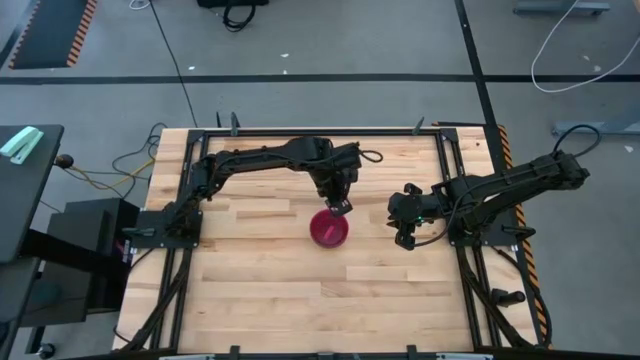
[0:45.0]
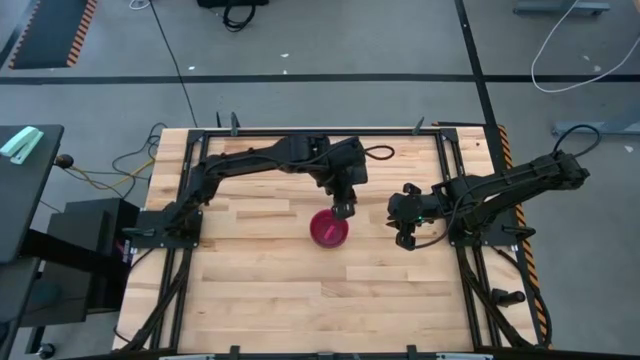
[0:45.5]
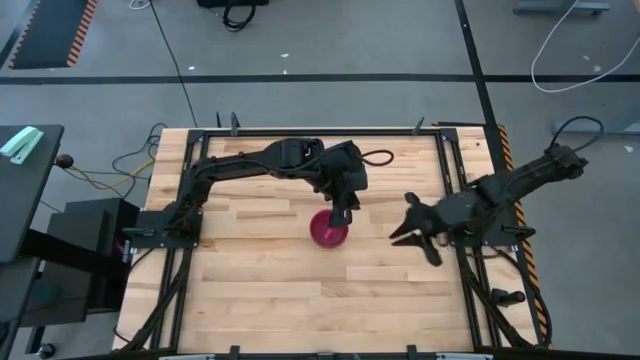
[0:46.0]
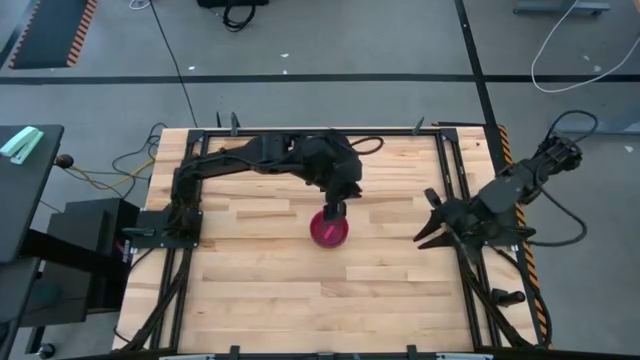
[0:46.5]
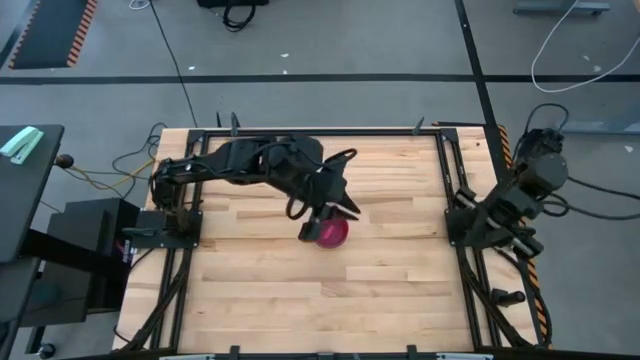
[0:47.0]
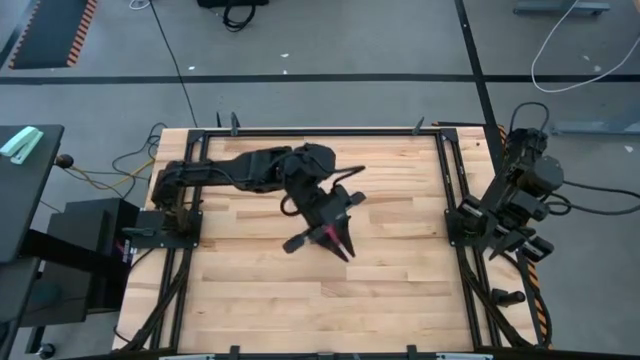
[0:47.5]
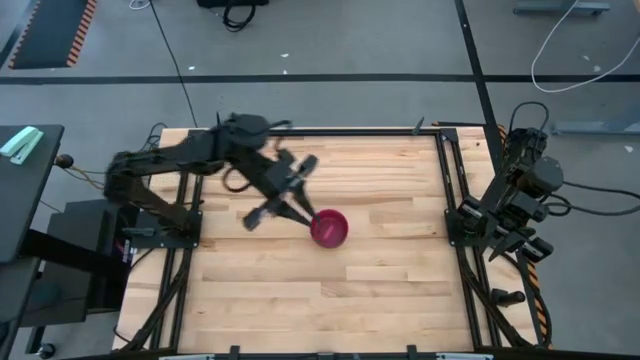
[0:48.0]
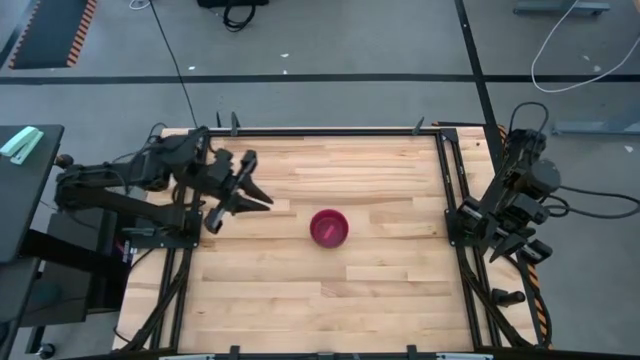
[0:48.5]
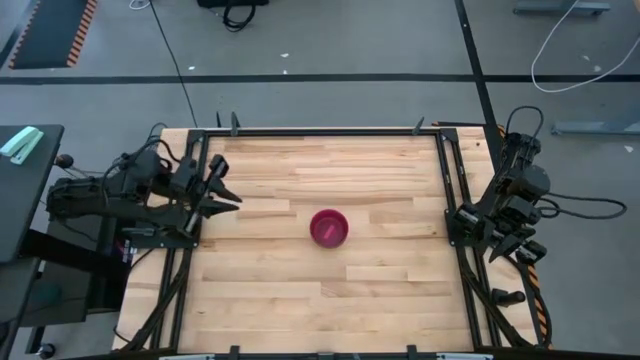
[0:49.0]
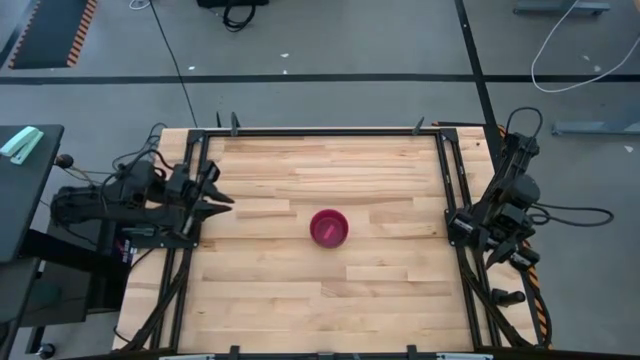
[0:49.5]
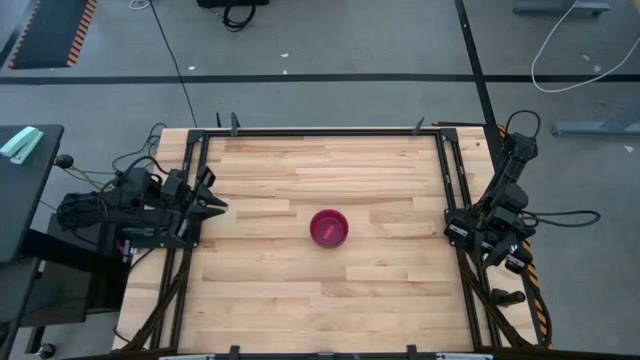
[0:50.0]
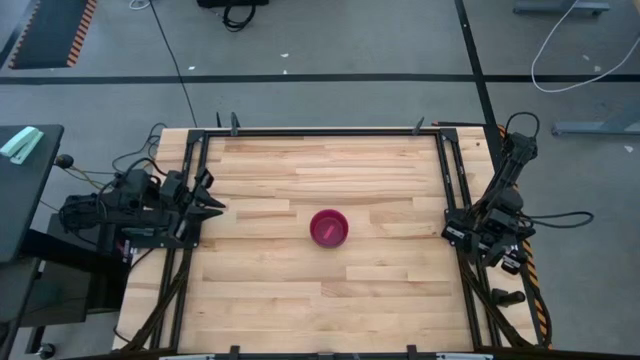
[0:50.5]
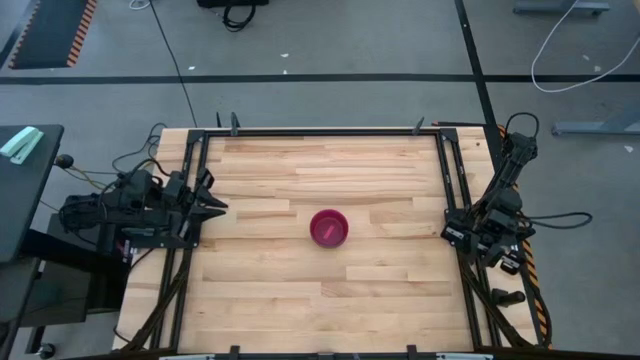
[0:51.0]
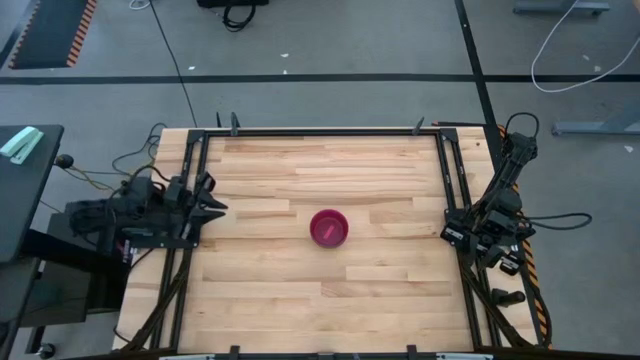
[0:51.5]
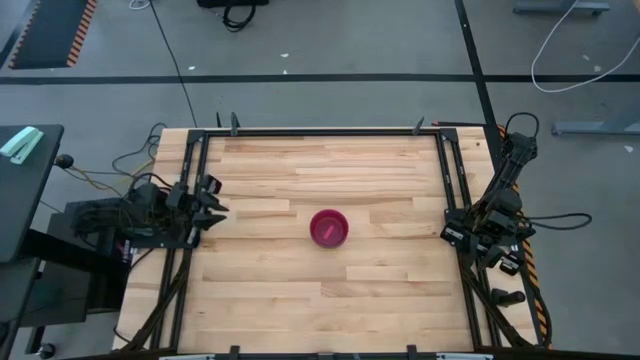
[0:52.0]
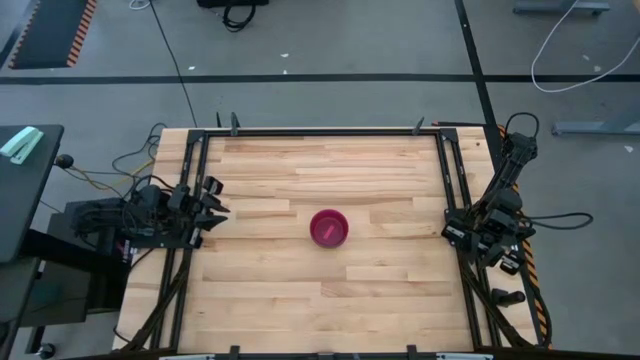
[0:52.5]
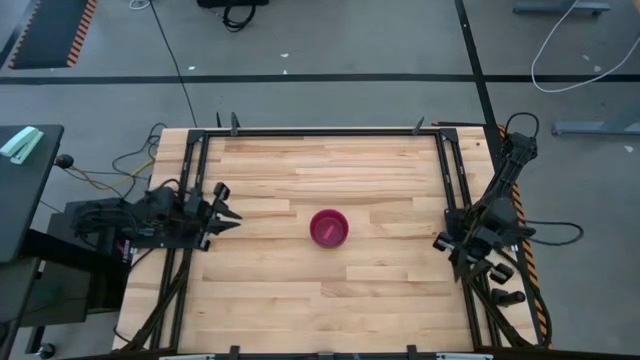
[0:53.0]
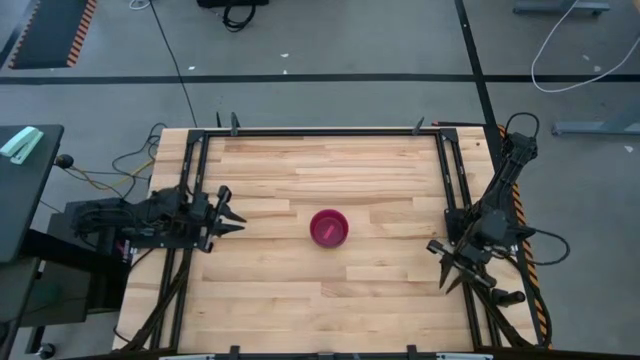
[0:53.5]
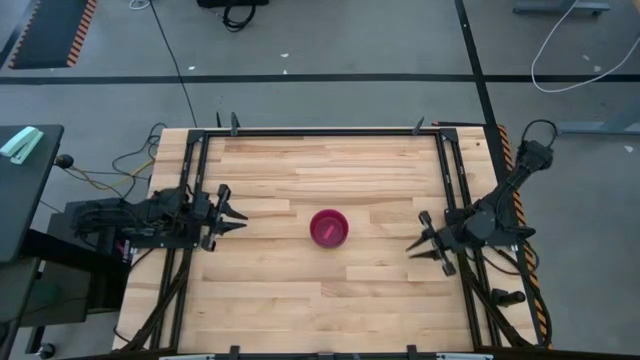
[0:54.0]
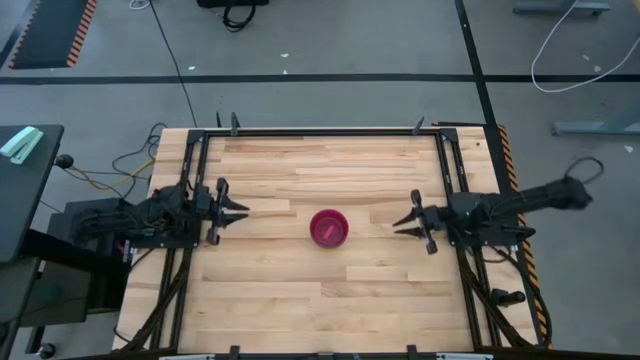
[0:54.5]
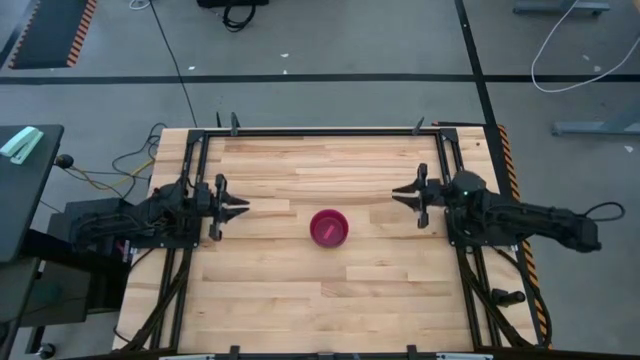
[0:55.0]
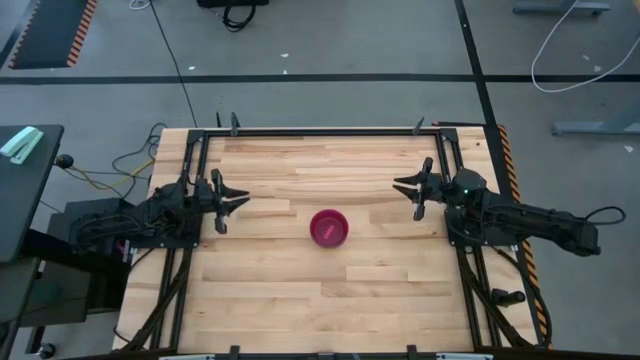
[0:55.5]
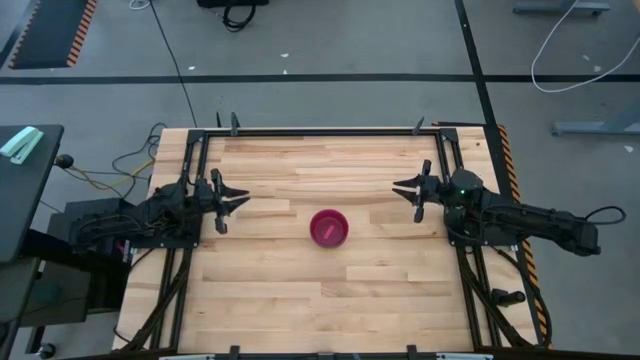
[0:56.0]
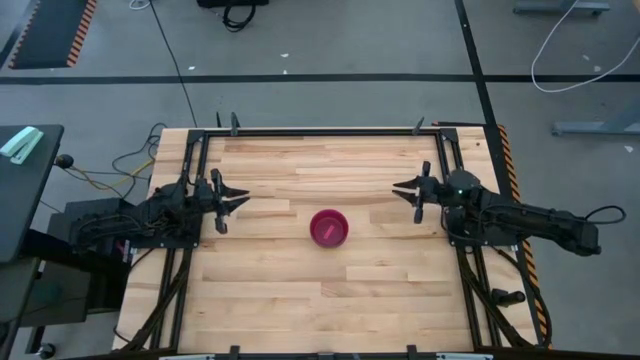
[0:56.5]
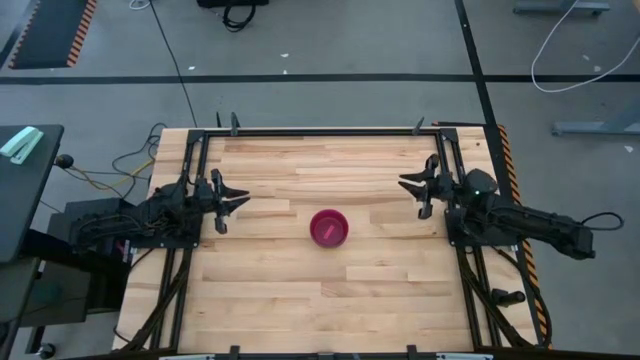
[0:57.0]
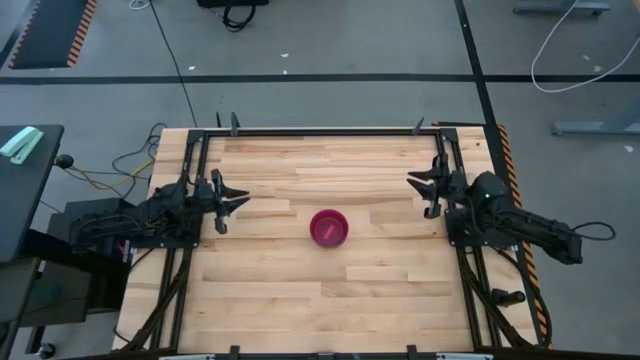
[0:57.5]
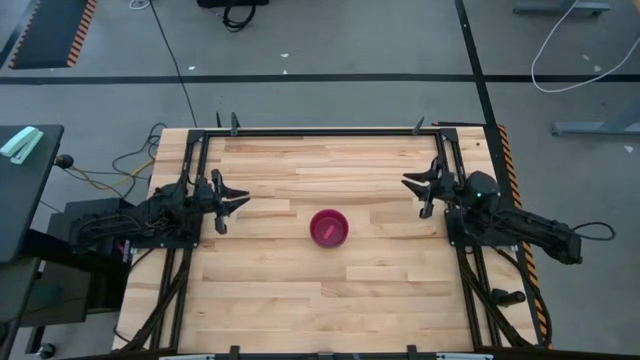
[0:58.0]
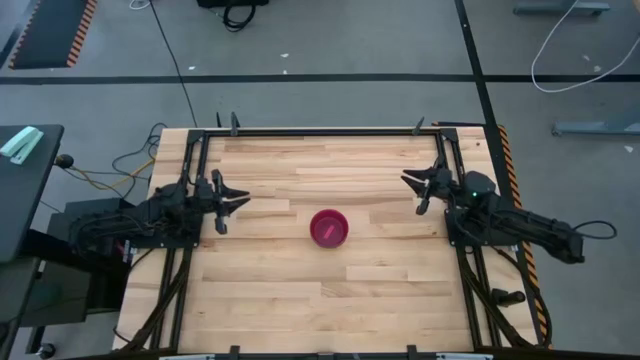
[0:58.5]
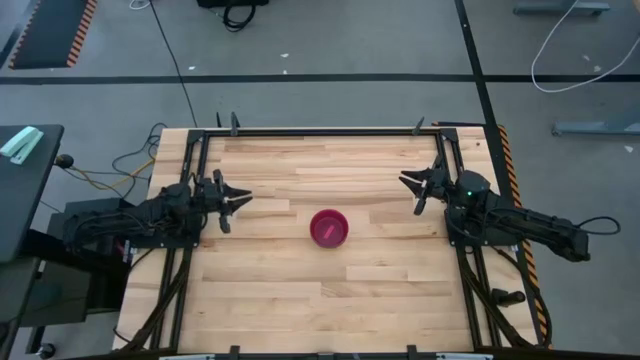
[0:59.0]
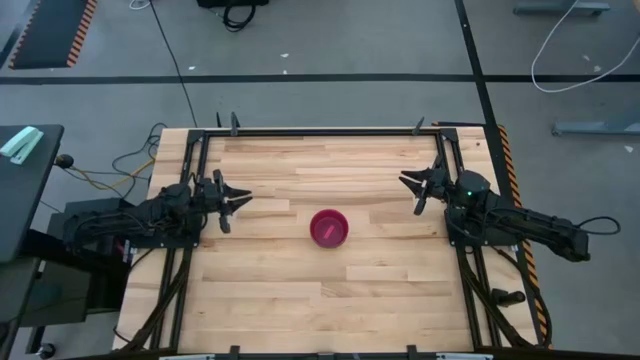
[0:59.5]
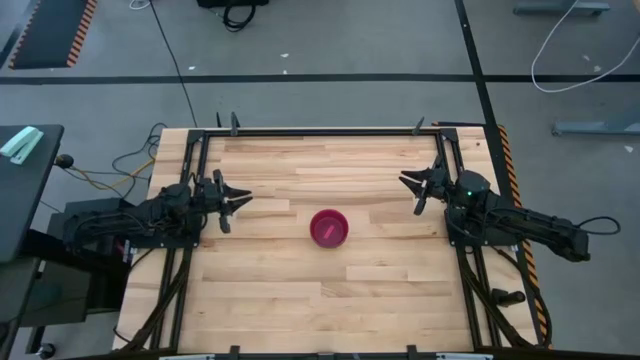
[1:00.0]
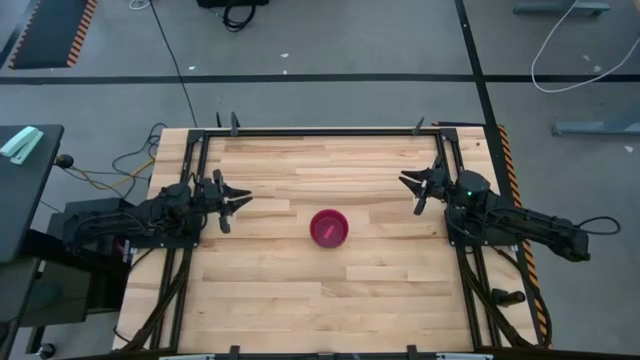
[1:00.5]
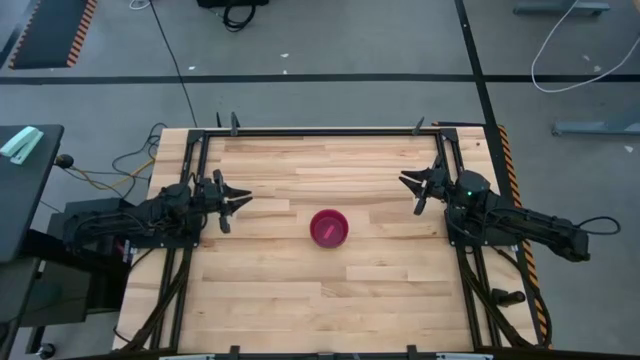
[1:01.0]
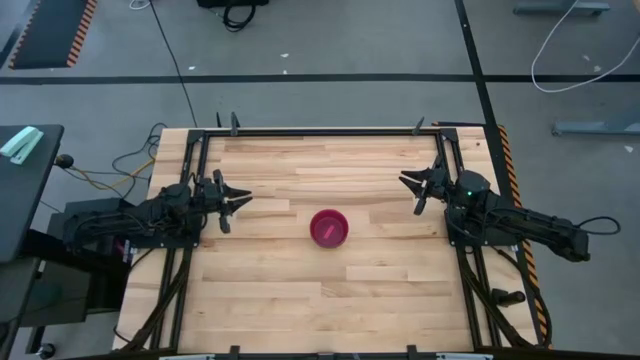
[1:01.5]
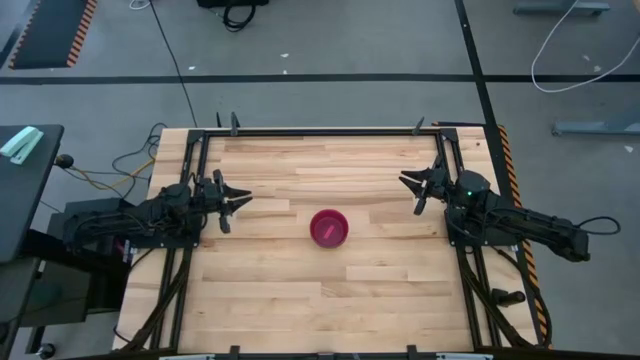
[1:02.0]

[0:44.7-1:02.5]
Task: Nest bowls inside each other
Return to Home Position

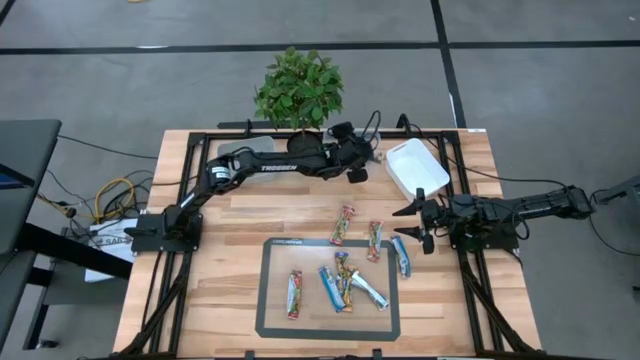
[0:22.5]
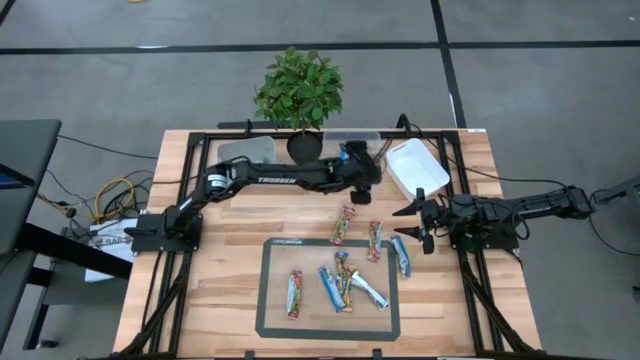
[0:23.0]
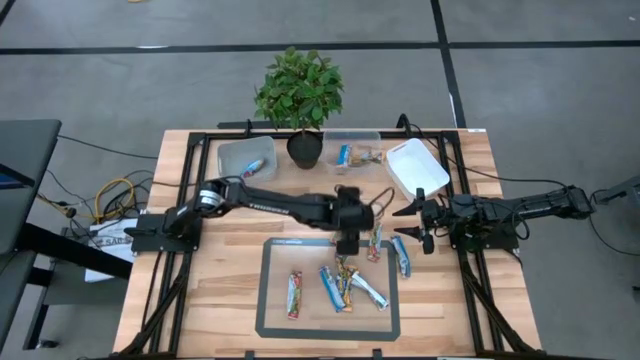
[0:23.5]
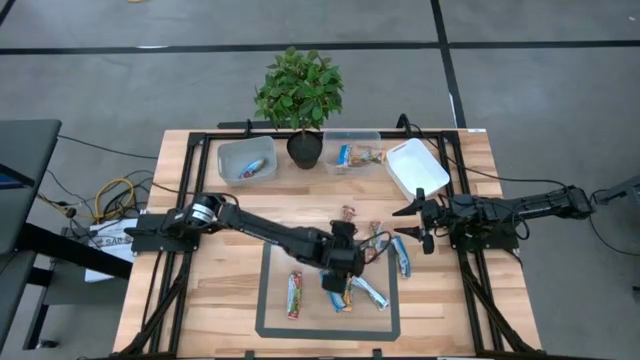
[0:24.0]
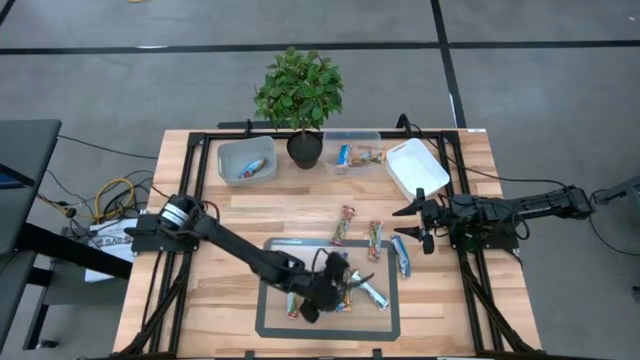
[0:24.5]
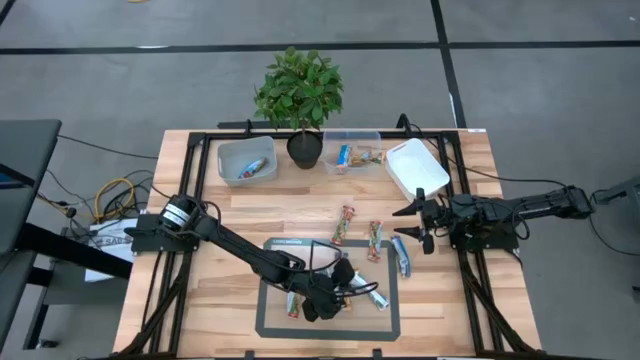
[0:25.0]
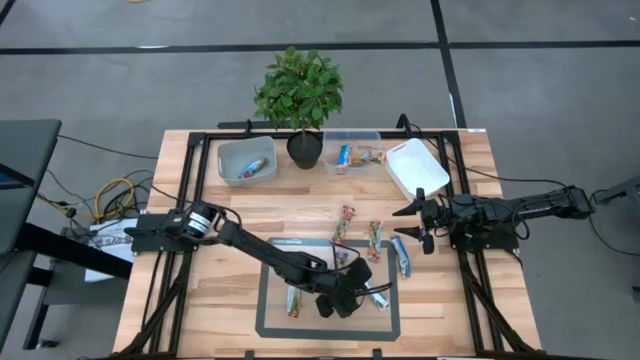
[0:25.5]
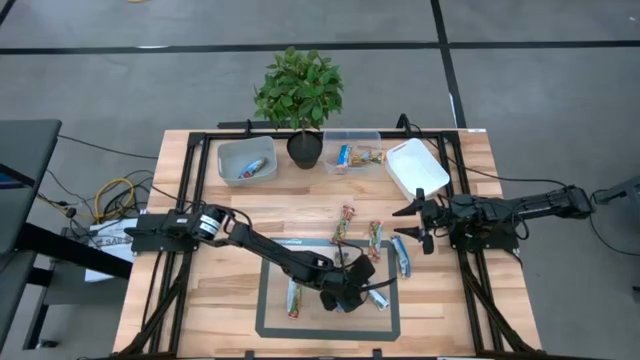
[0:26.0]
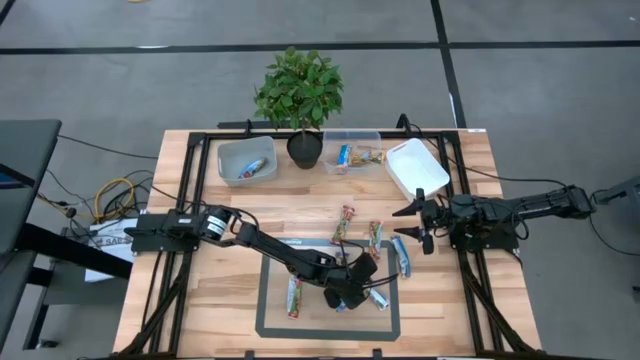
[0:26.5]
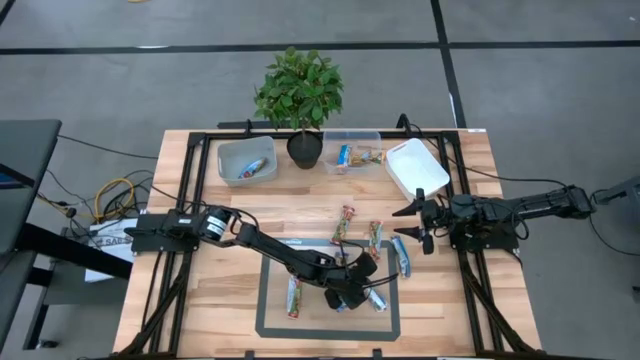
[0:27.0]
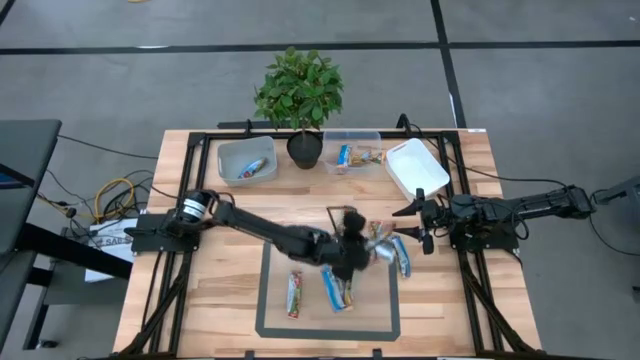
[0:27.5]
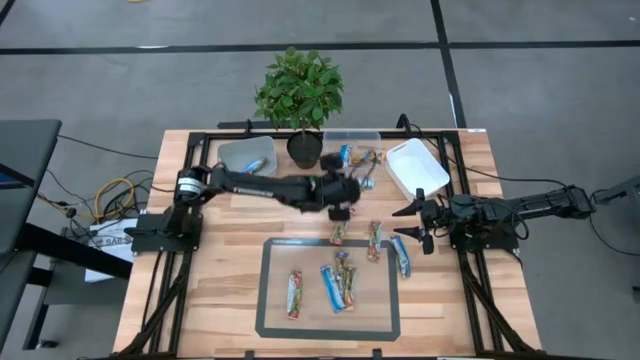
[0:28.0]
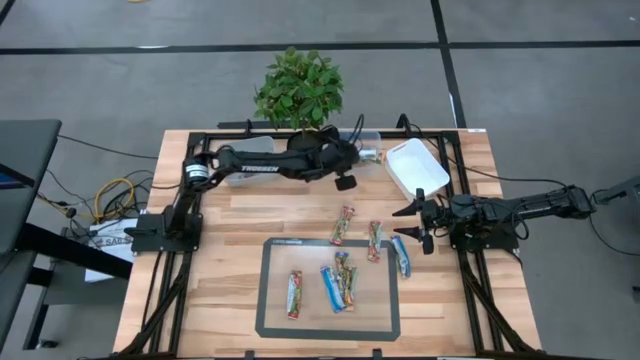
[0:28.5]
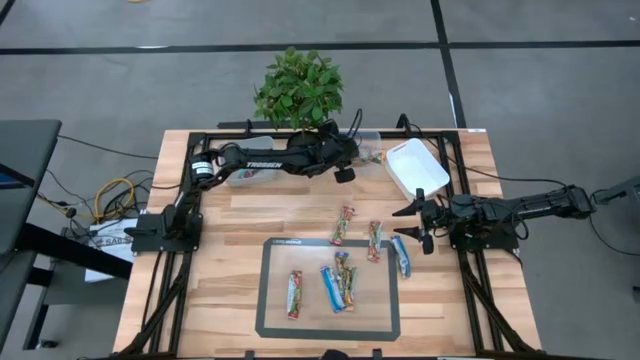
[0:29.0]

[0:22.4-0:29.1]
Task: Pick and place Granola Bars by type
Put the yellow granola bar into the transparent bin
